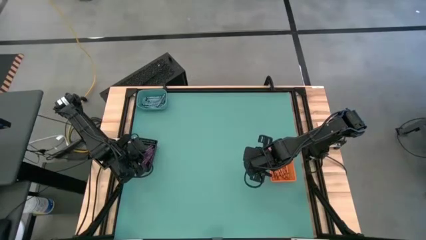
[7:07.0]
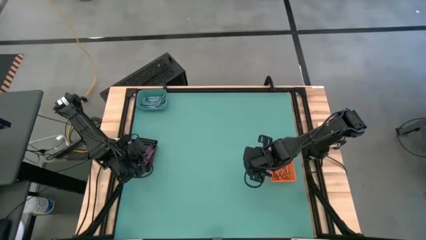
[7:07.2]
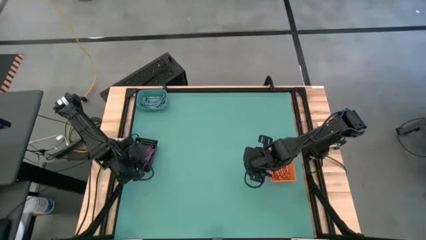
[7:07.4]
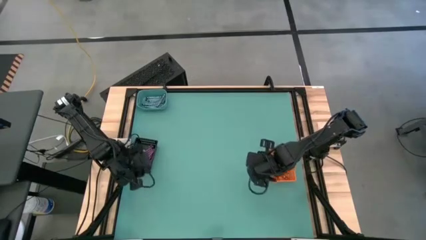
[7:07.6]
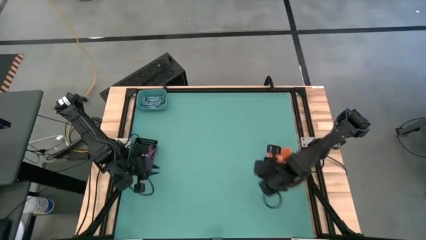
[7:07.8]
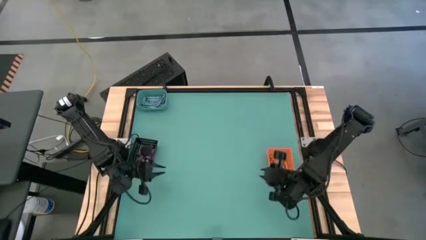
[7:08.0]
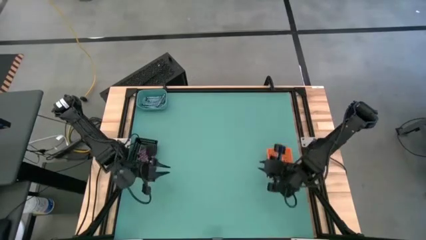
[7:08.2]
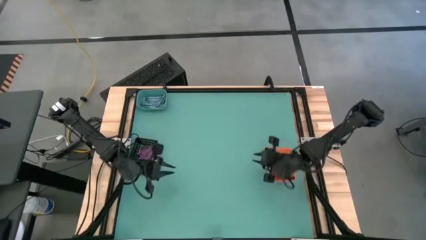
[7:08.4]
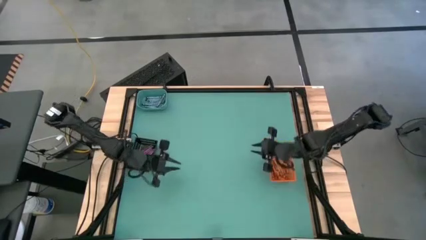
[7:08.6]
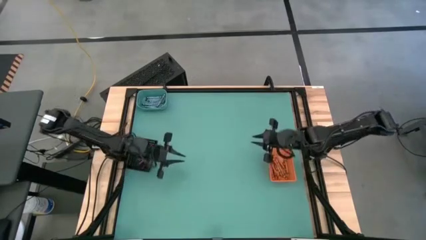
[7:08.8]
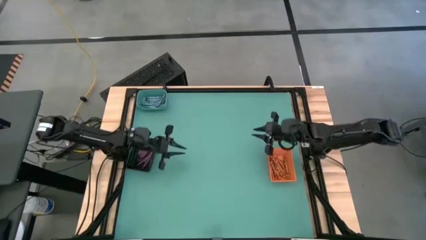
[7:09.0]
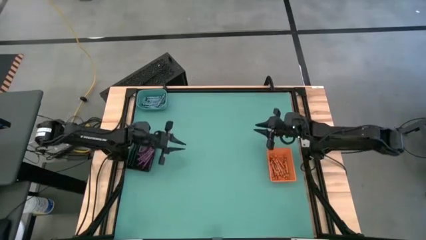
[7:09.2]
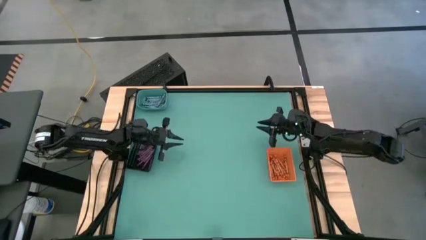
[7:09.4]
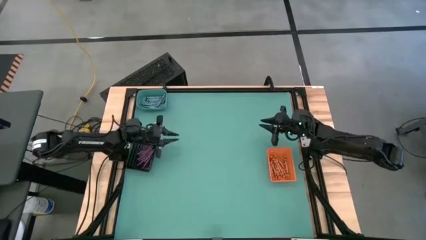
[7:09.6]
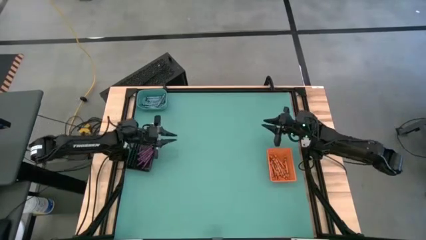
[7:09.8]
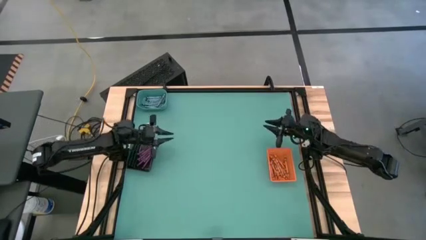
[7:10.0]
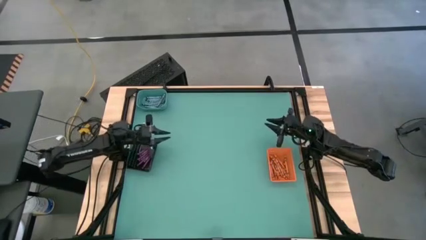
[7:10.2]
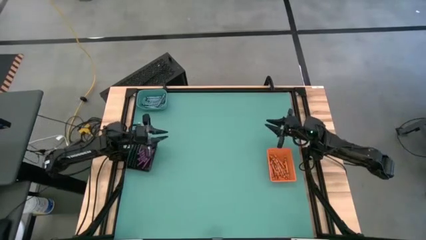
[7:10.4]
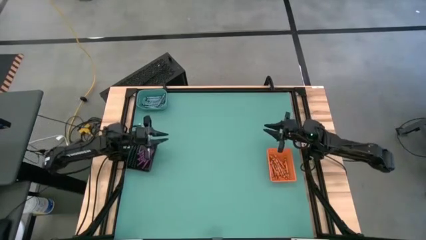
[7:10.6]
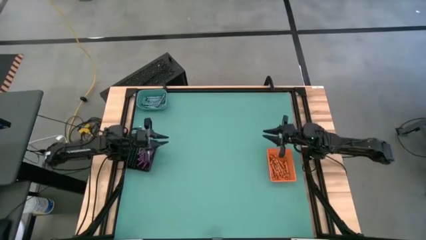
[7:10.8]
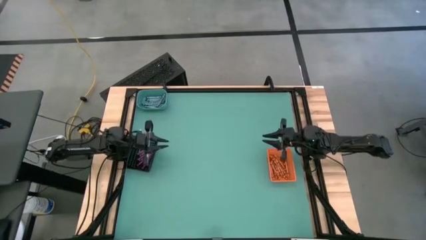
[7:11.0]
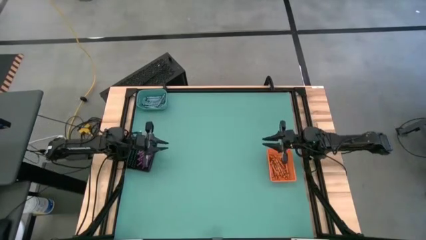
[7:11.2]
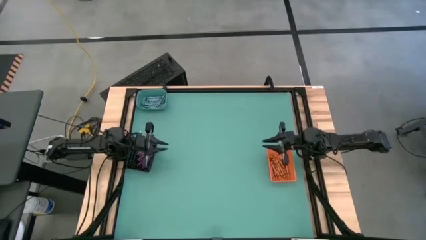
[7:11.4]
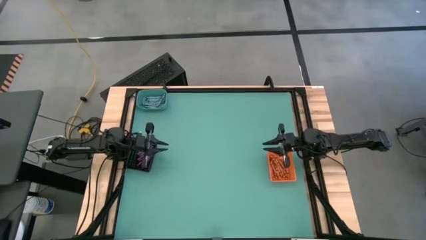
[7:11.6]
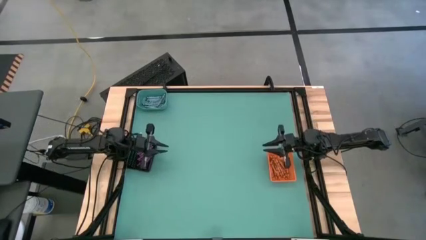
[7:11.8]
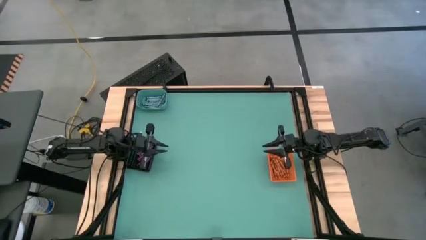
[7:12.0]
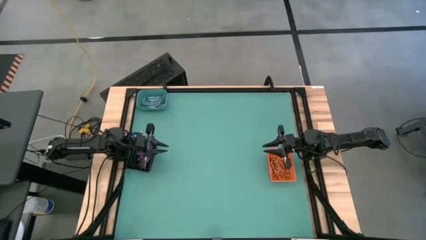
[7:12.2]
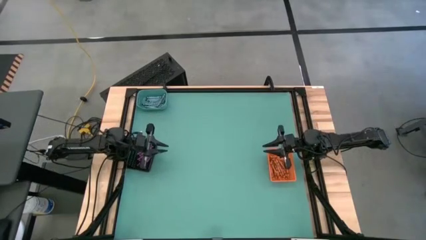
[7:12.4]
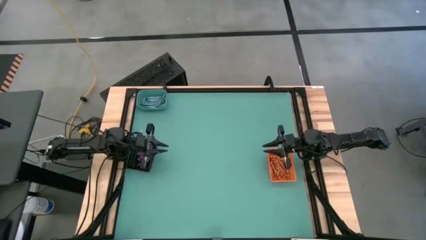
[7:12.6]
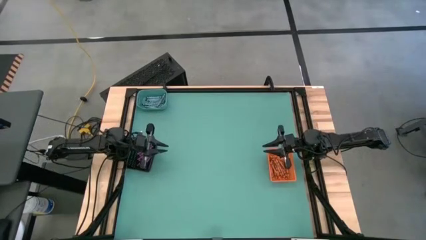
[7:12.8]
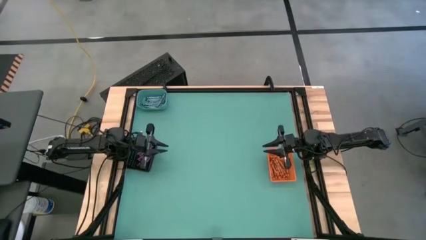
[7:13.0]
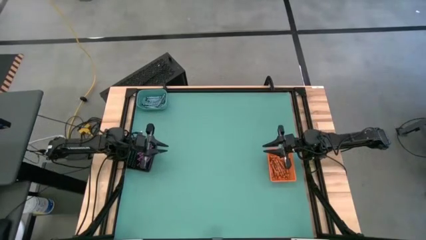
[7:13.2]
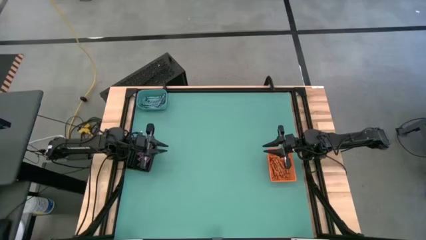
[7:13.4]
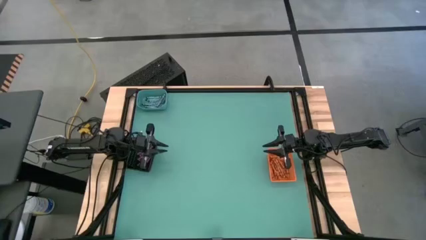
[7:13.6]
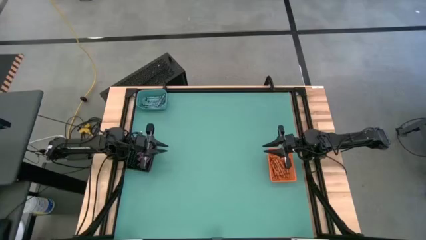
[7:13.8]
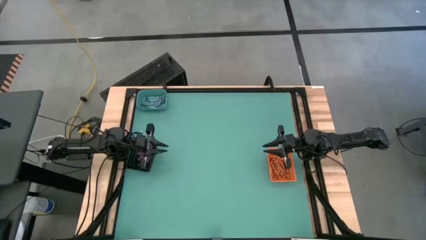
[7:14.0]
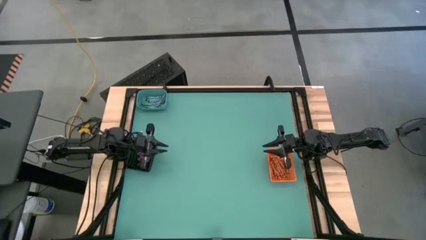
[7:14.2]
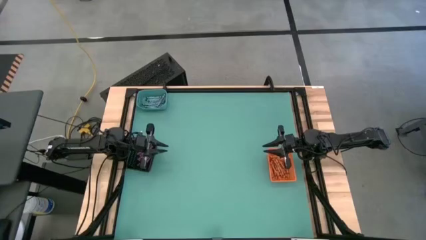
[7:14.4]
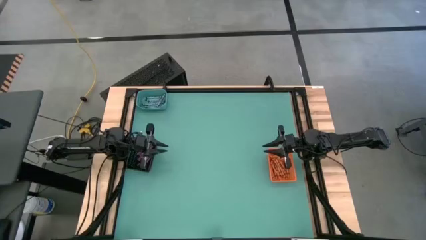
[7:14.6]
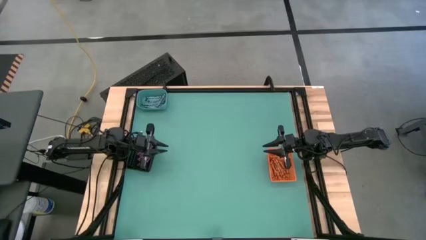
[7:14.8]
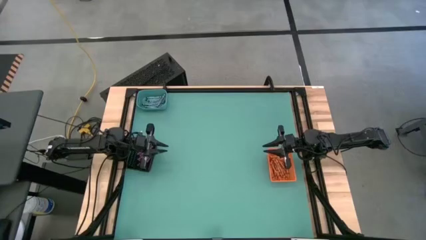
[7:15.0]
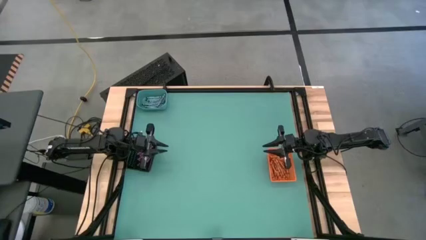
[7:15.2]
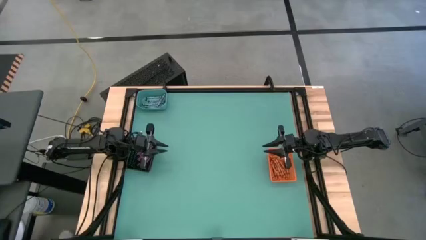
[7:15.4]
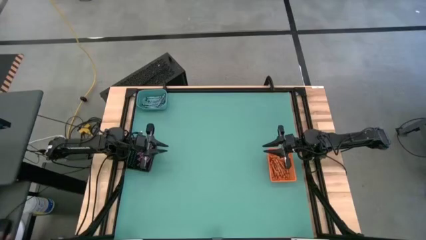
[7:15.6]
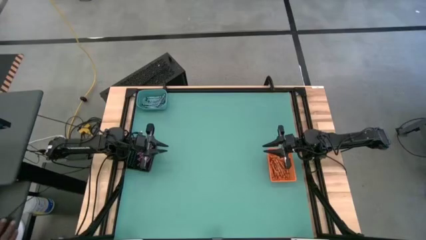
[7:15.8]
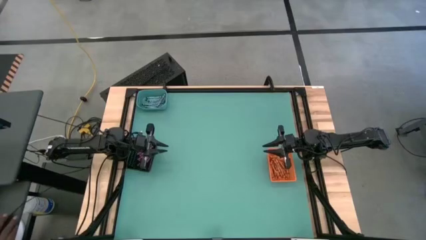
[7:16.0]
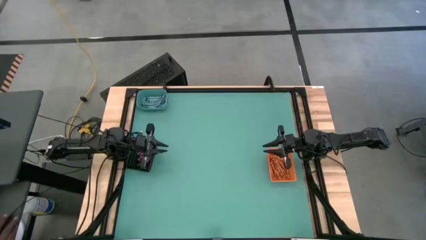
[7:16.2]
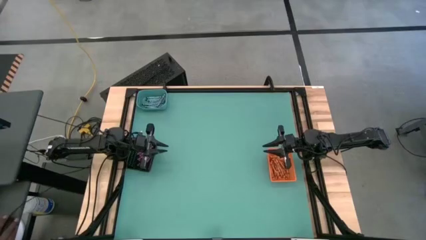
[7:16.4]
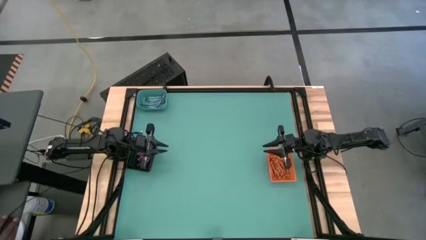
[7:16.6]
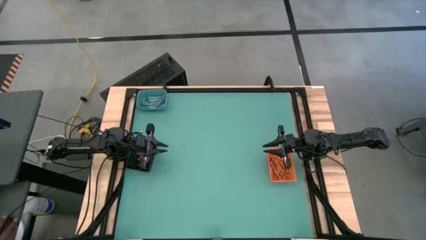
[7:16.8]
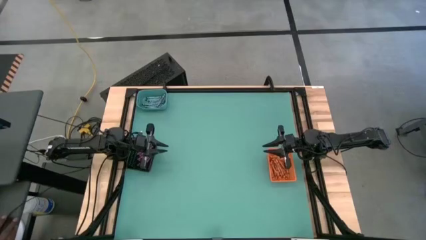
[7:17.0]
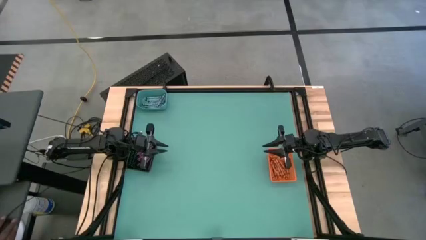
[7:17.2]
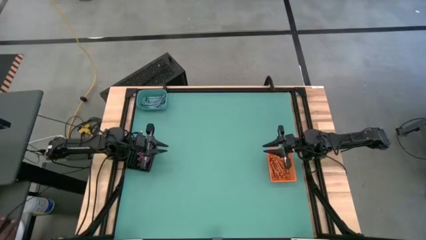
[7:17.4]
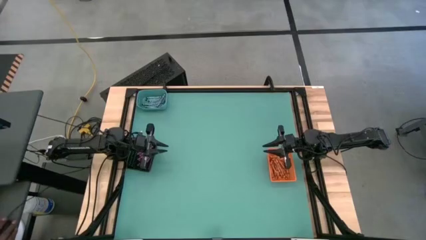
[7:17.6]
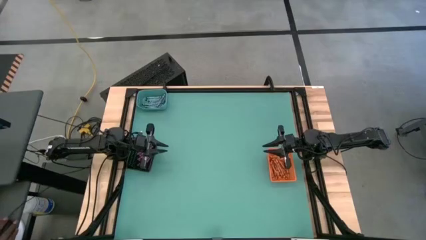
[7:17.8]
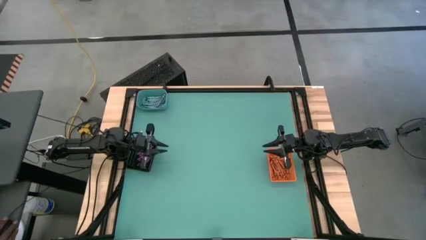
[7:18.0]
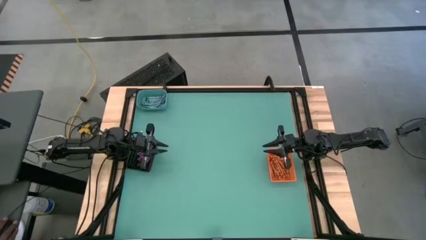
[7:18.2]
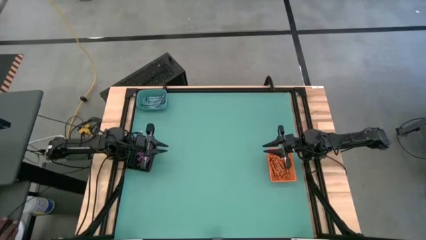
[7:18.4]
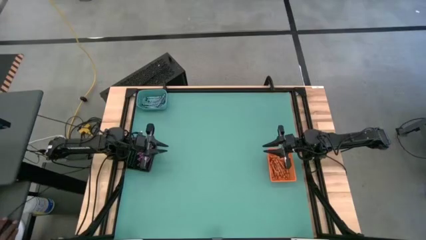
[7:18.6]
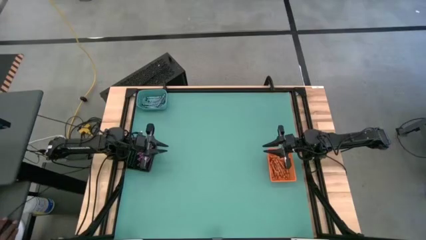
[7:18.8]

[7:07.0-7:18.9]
Task: Sort crayons
Return to Home Position

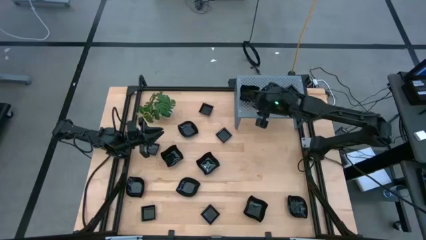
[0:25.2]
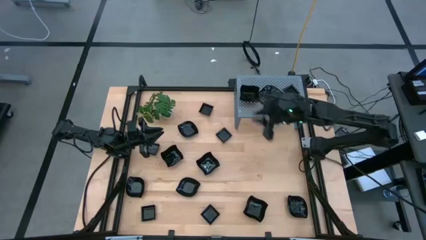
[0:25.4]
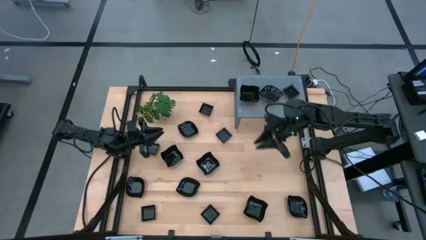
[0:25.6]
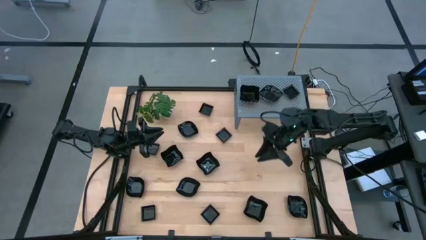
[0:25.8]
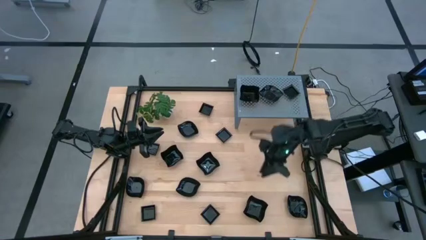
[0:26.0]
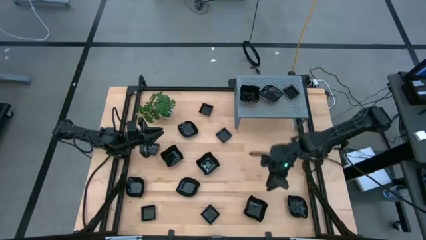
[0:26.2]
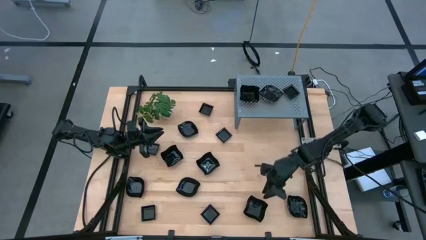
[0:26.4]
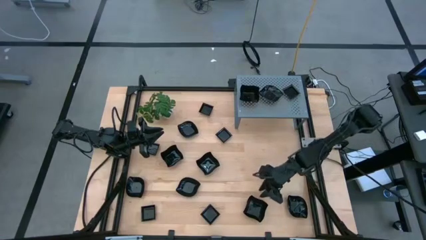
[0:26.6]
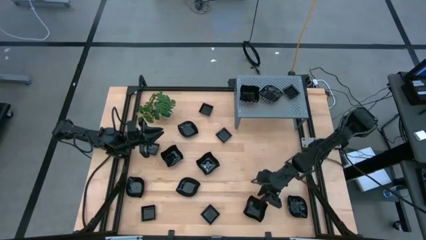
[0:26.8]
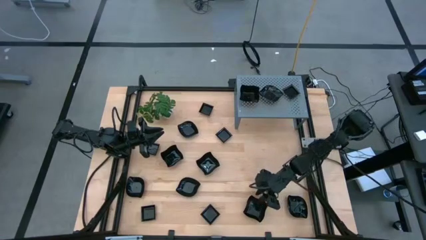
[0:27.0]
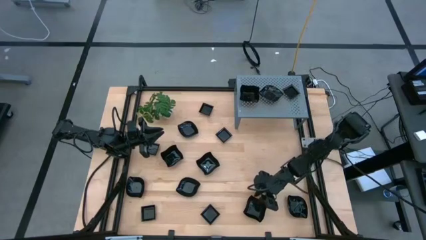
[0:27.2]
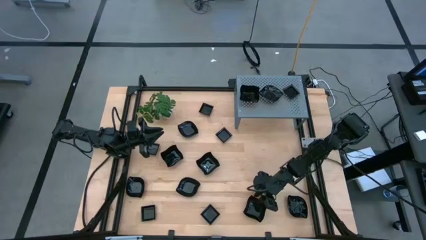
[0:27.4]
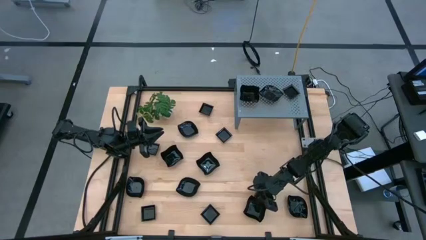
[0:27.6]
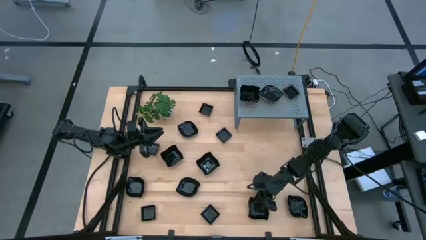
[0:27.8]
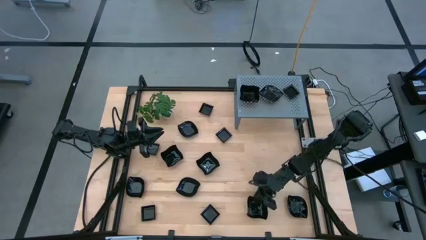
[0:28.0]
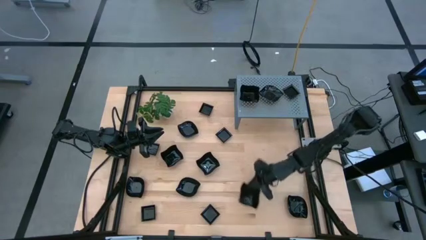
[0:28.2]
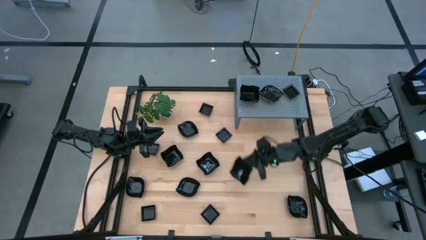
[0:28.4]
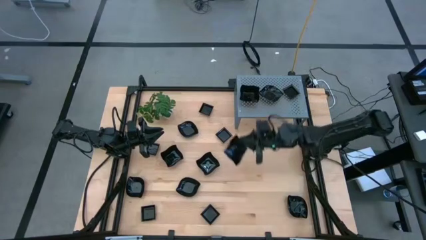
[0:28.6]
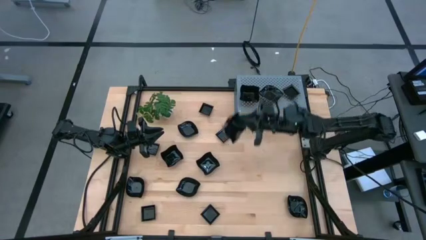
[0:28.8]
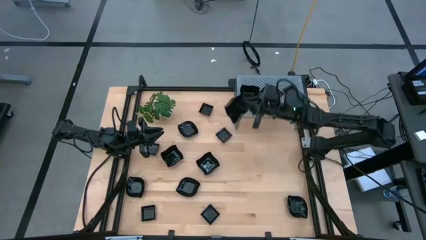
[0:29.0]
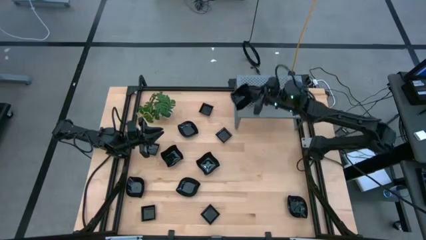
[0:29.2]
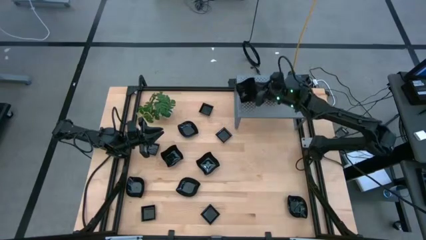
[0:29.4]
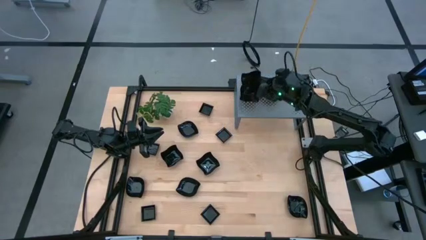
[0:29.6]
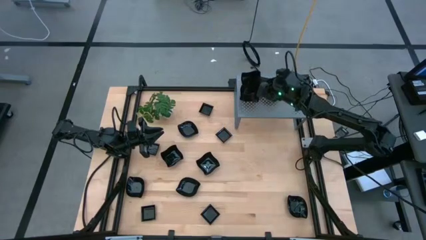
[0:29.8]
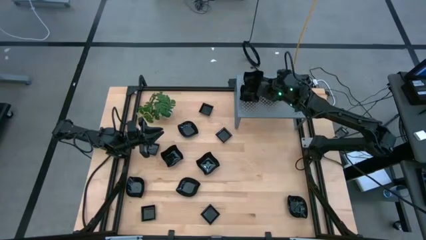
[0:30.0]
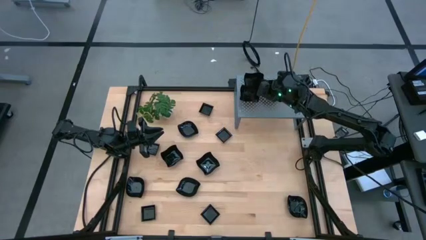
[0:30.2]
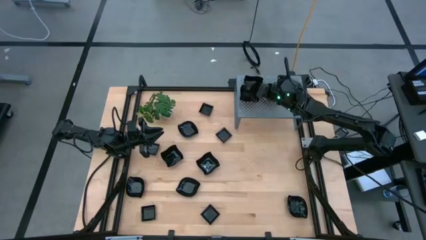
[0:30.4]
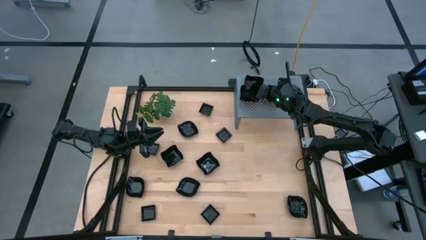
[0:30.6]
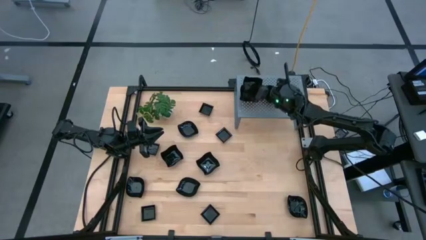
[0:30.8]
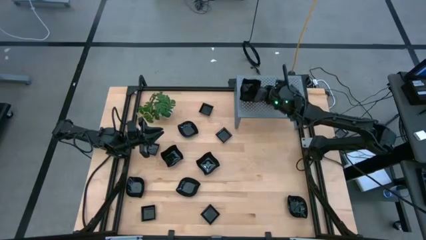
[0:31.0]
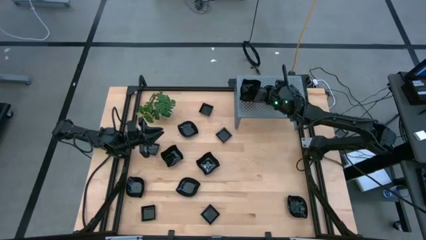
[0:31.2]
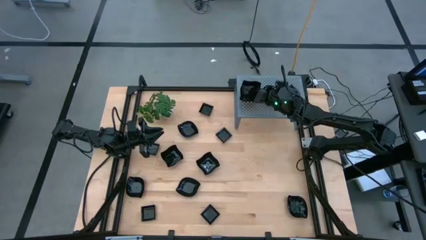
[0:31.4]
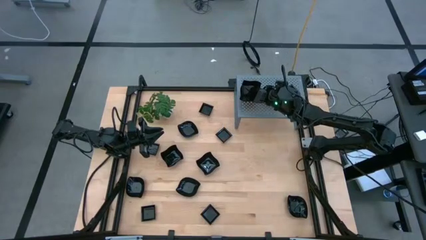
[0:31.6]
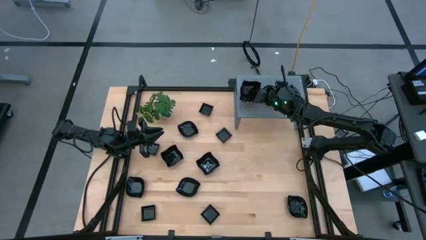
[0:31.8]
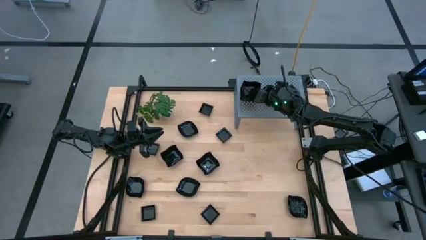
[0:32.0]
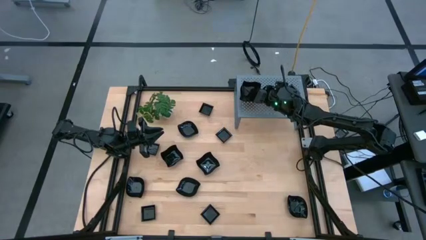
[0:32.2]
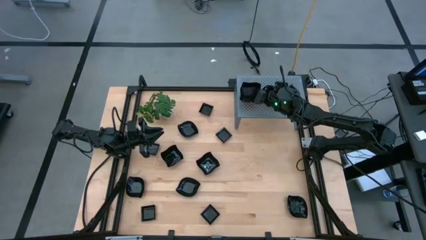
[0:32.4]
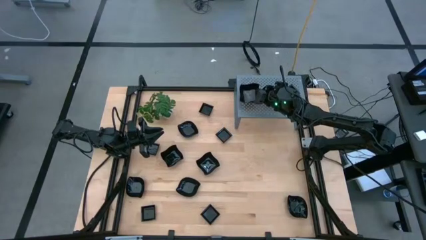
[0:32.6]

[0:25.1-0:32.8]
Task: Pick & Place Mini shaped plates
Stack the distorted square plate on top of the distorted square plate on the shelf
